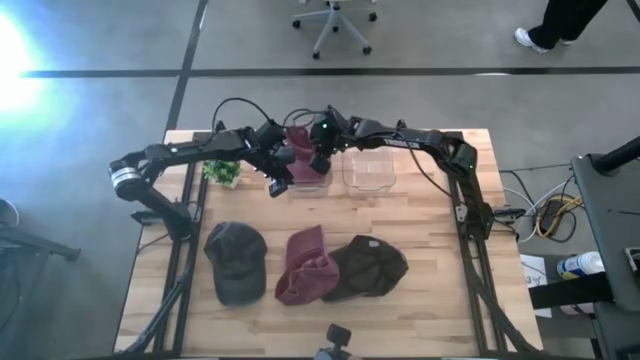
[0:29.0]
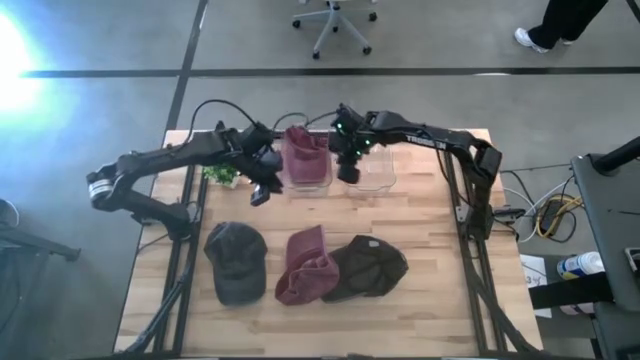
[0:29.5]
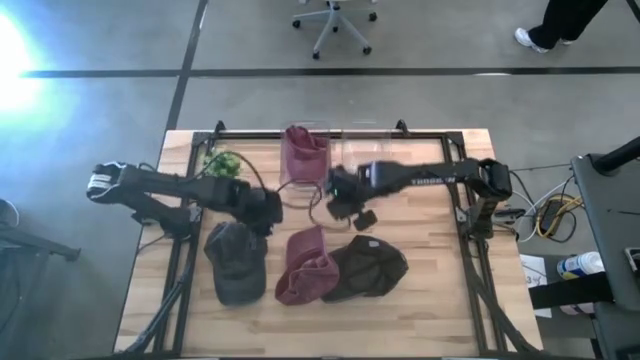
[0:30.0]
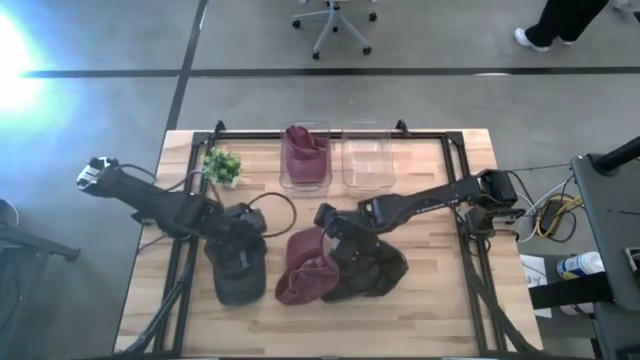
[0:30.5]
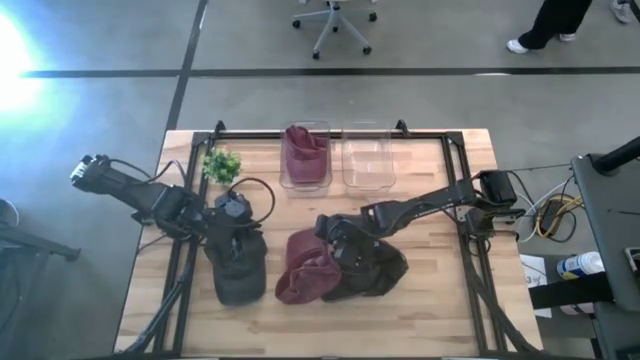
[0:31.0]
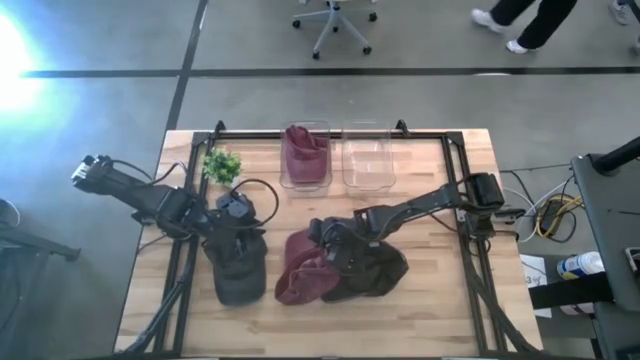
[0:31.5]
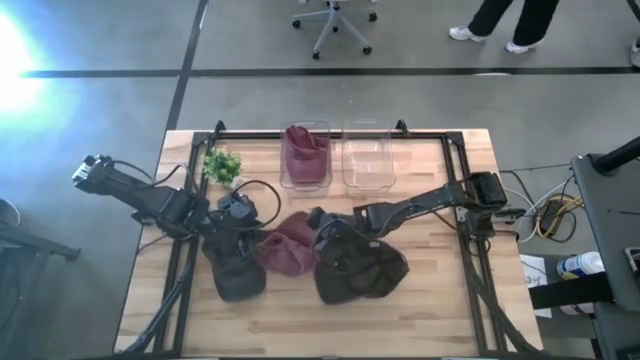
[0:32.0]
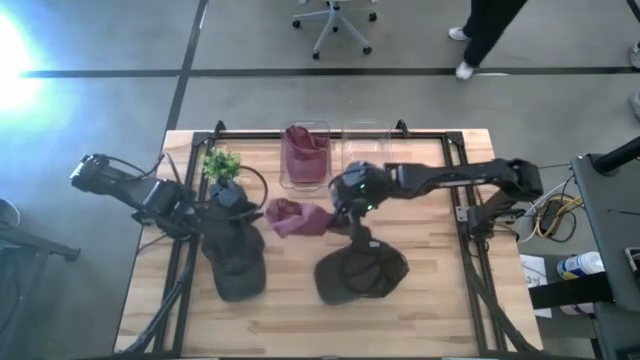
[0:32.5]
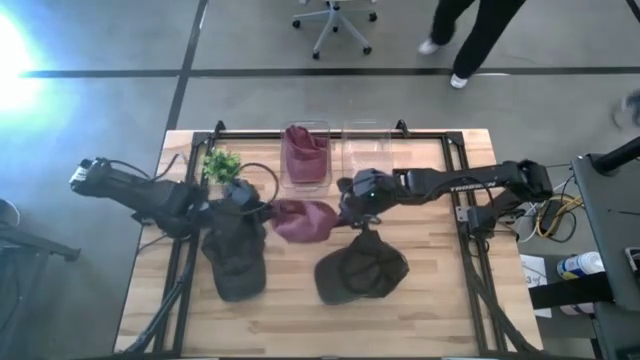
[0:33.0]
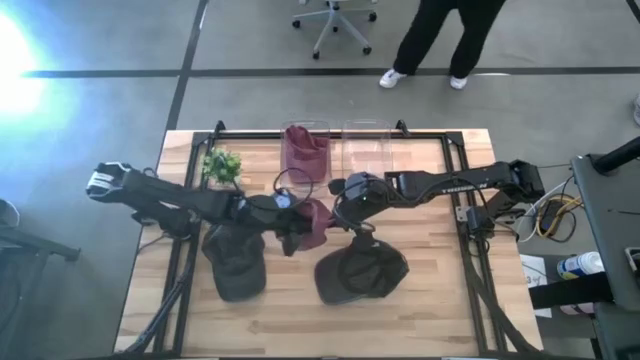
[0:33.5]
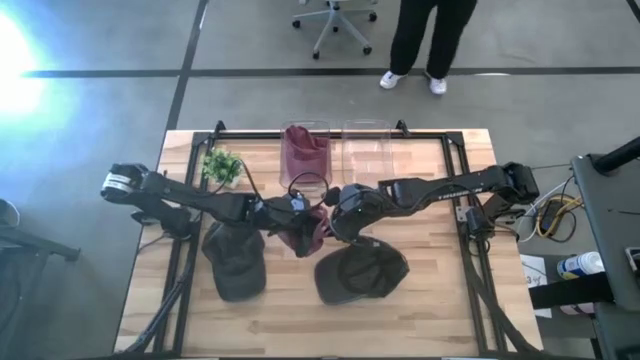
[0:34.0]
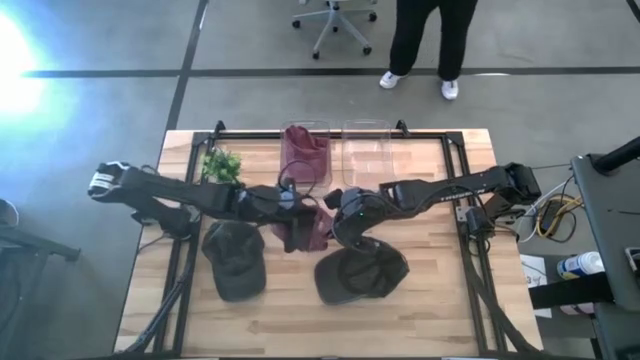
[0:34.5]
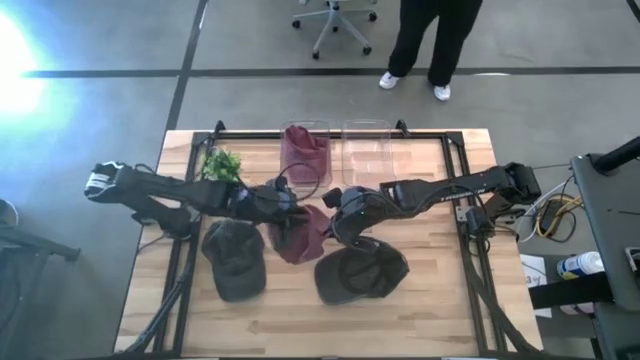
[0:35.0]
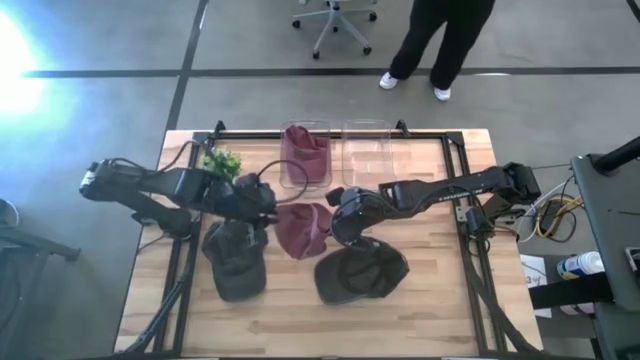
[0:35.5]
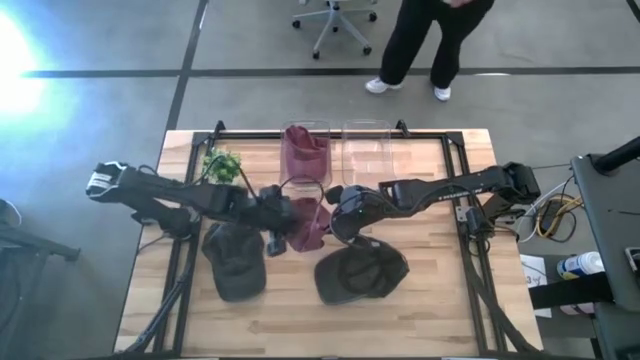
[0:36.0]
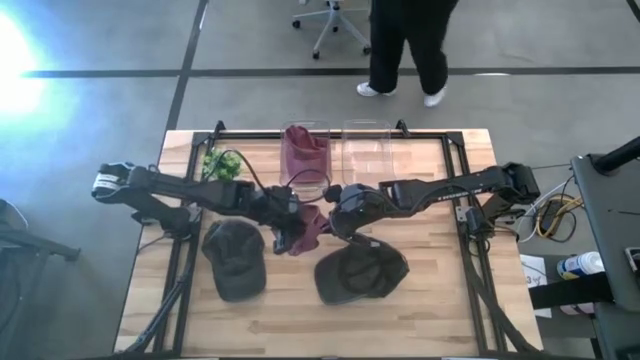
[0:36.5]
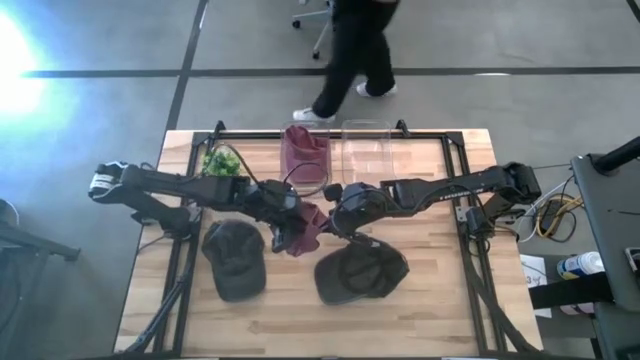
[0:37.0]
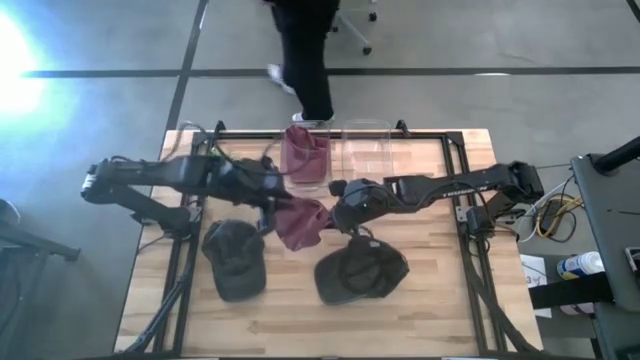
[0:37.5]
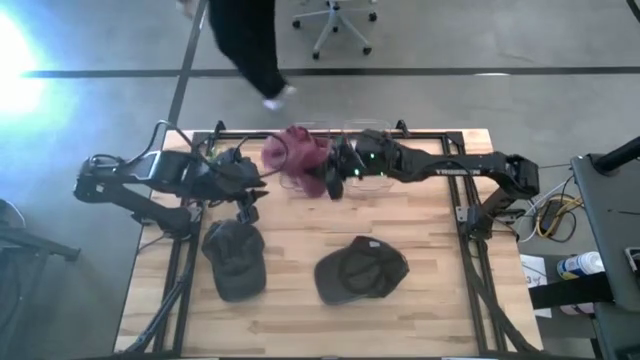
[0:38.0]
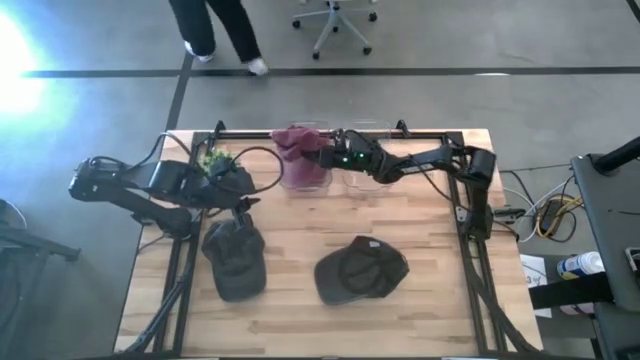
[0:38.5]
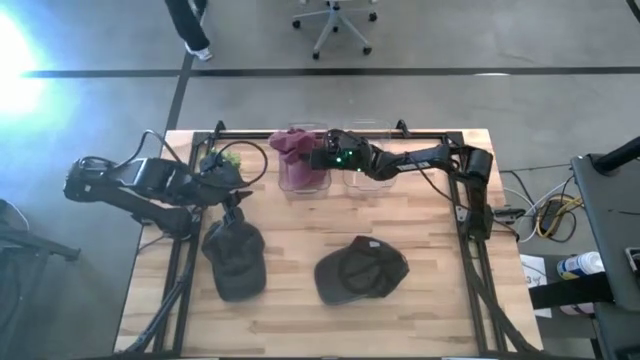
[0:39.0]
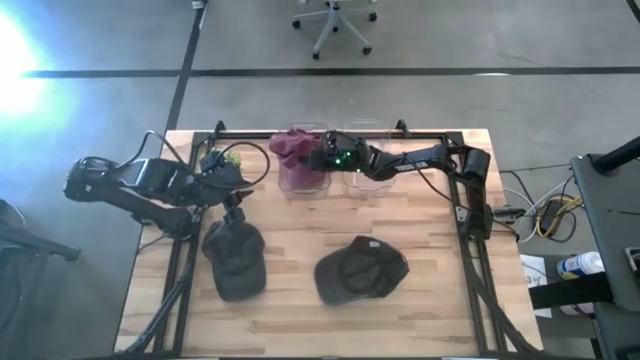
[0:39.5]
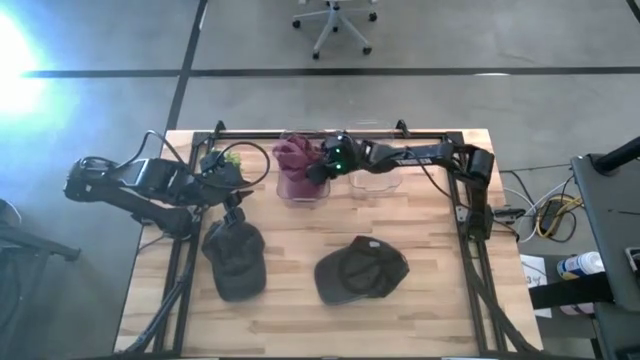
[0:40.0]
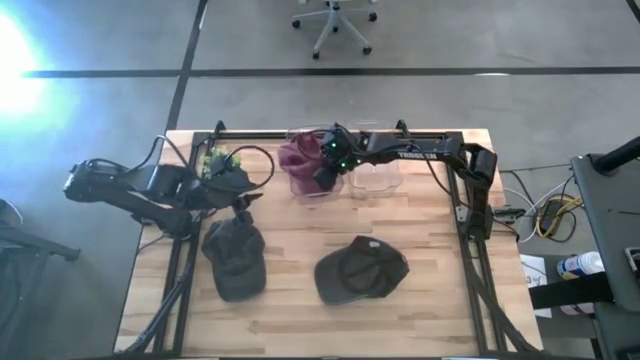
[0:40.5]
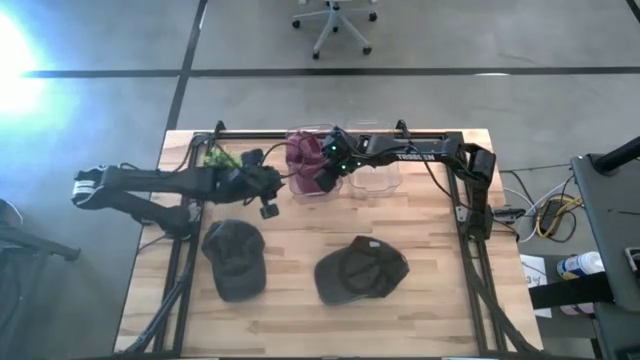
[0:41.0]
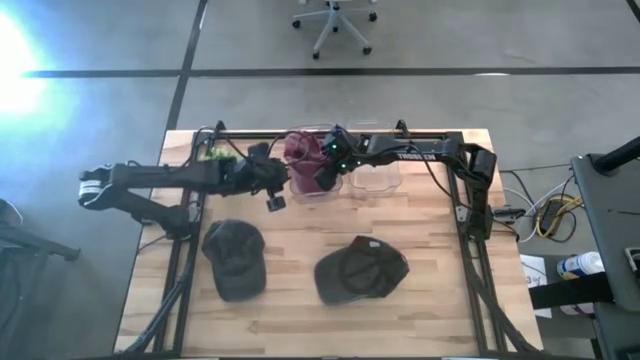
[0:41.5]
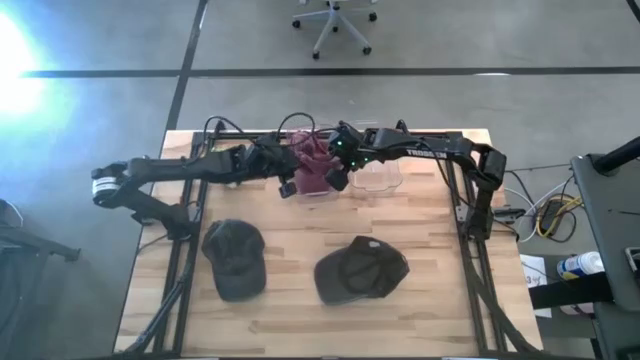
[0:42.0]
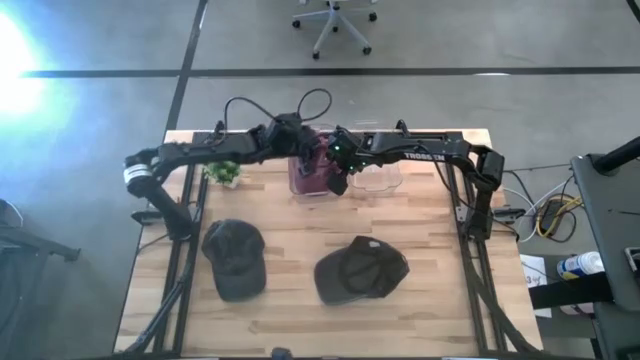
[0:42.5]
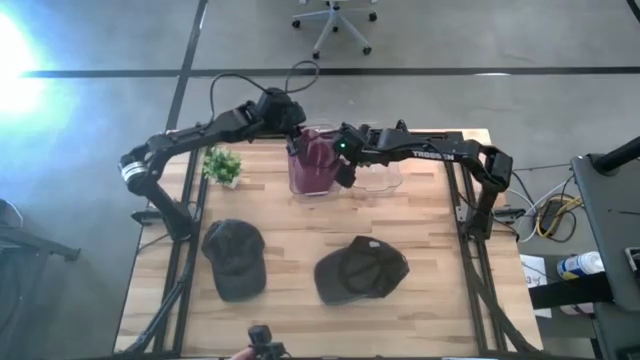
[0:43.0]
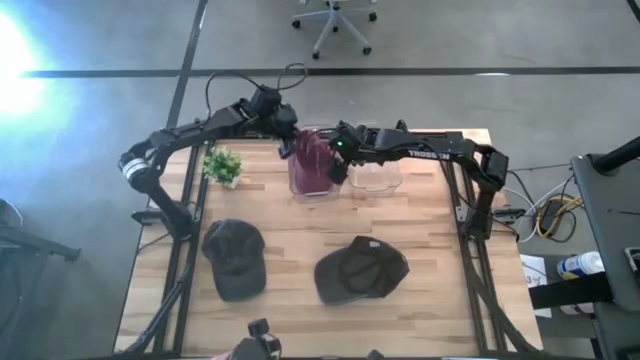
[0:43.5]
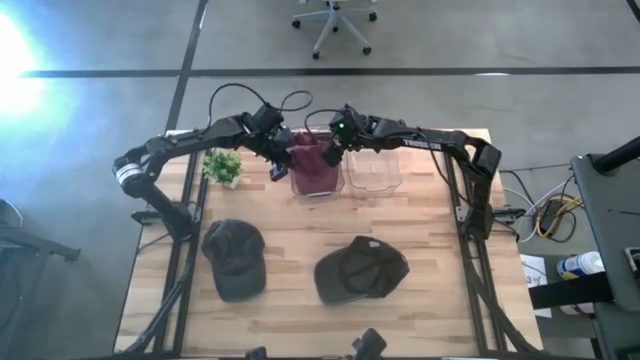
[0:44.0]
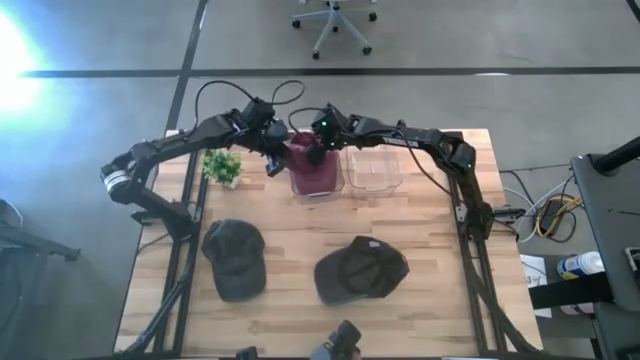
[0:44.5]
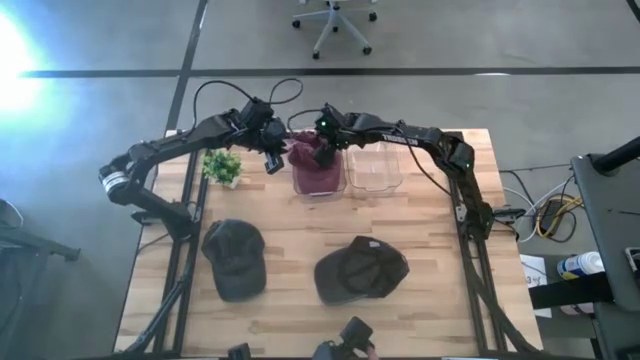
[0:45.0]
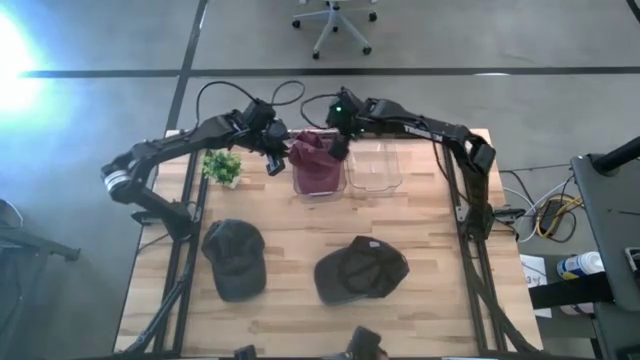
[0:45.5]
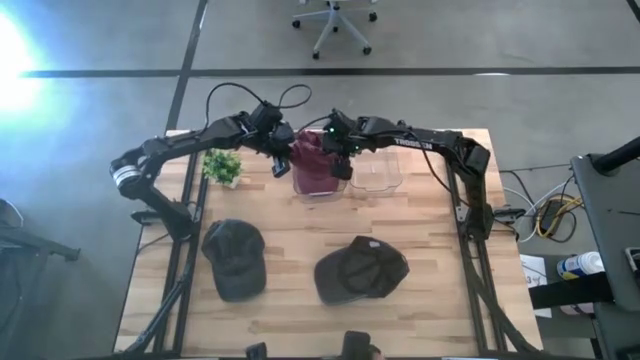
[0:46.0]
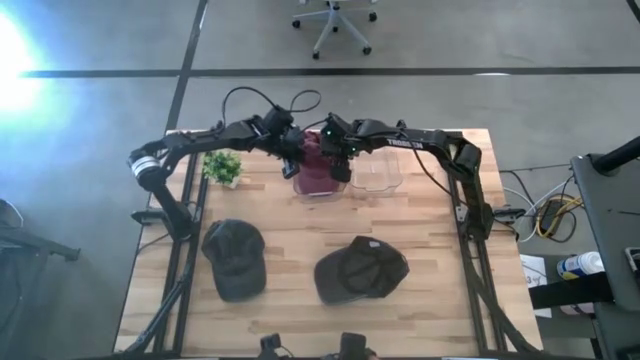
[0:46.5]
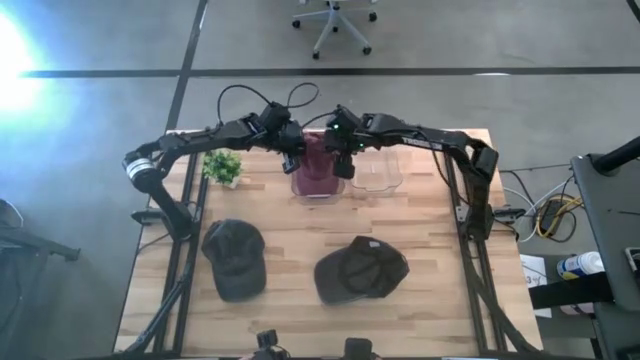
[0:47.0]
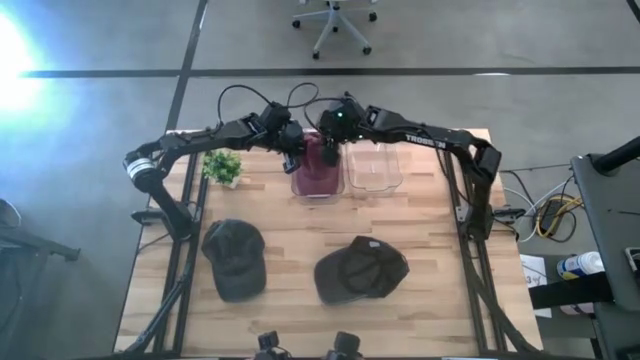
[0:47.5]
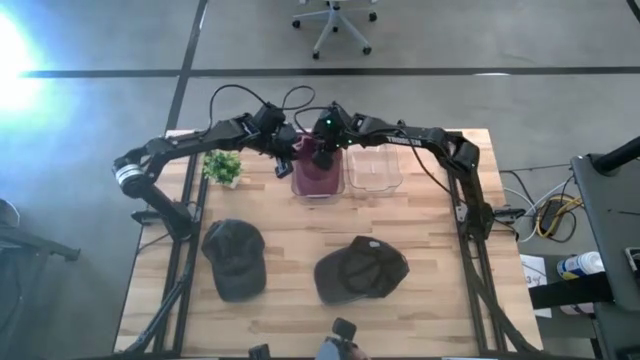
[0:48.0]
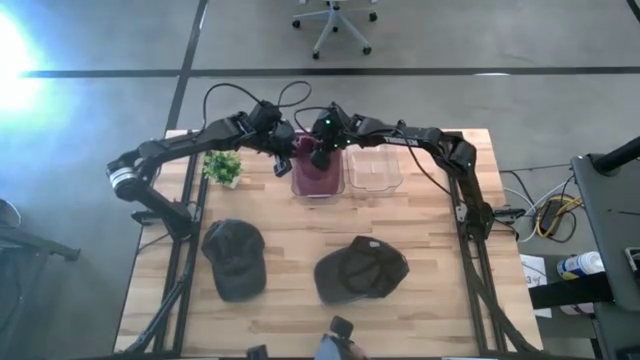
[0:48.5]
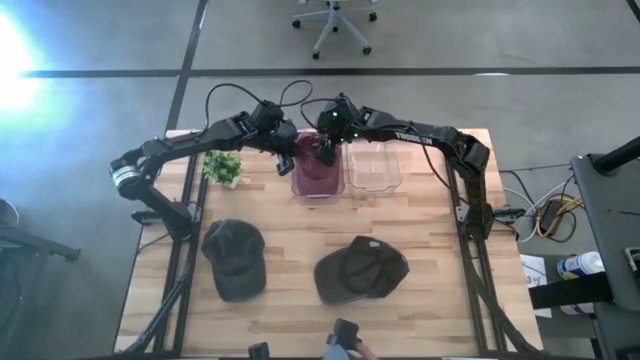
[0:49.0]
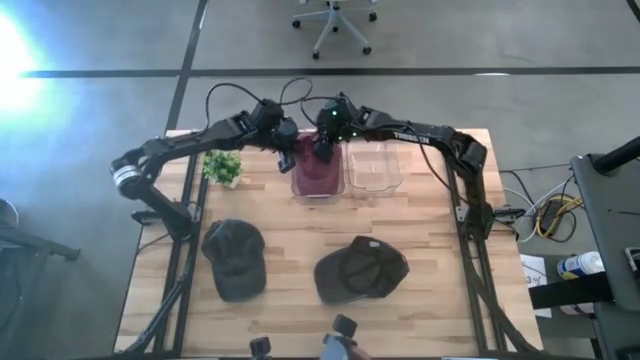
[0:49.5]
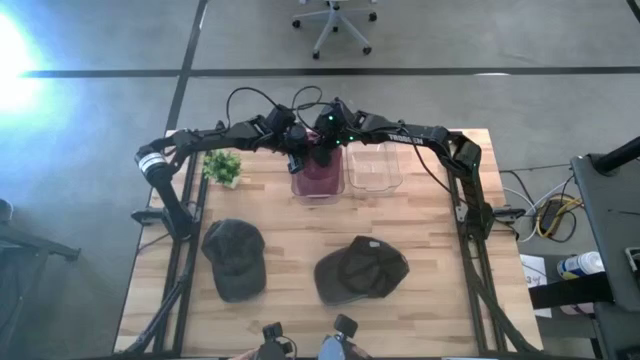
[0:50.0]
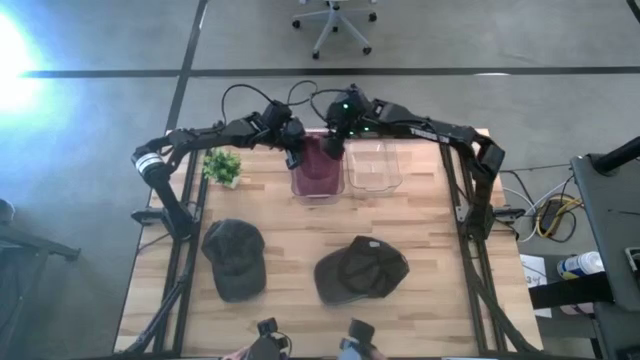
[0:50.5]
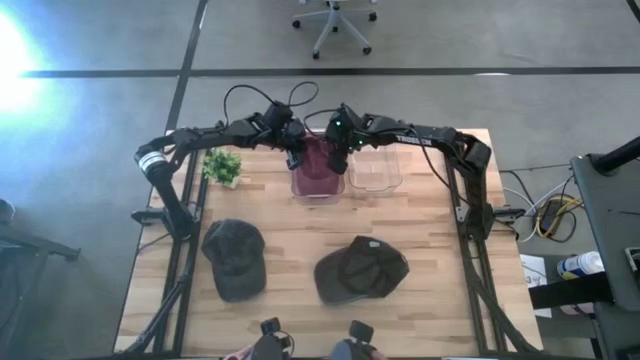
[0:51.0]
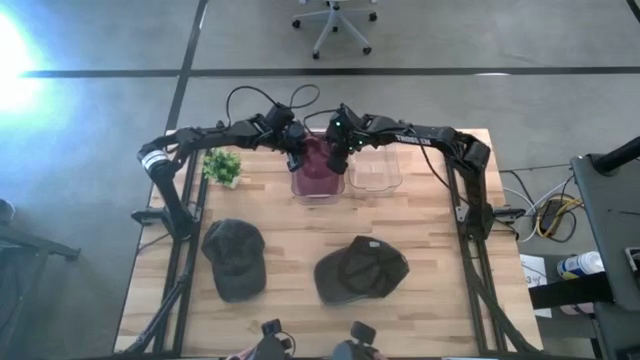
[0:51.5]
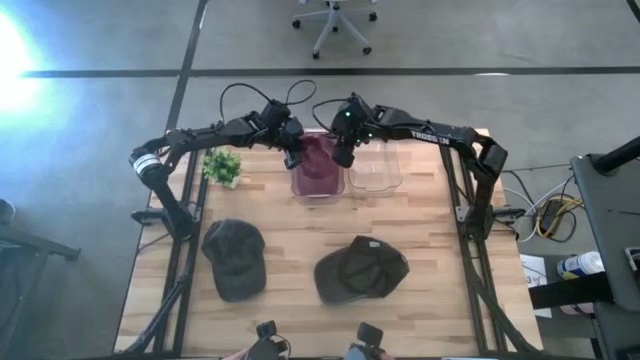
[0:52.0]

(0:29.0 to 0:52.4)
Task: Pick & Place hat
Put the red cap into the left transparent bin
